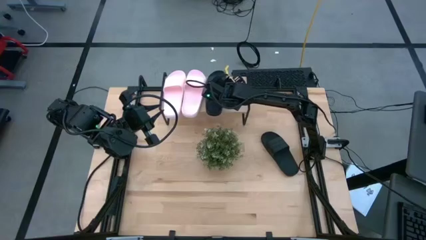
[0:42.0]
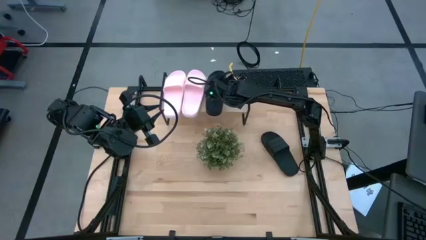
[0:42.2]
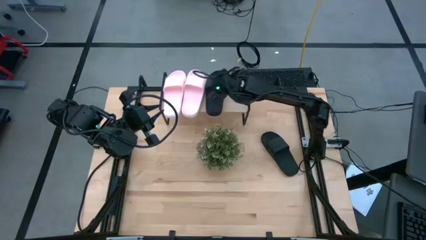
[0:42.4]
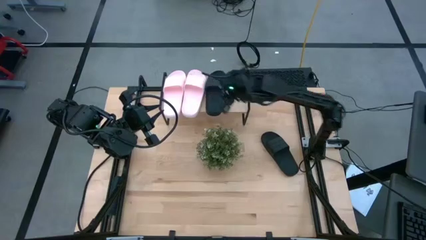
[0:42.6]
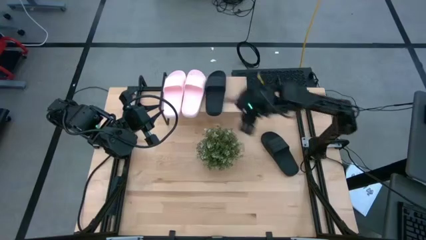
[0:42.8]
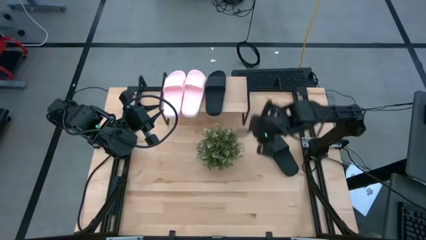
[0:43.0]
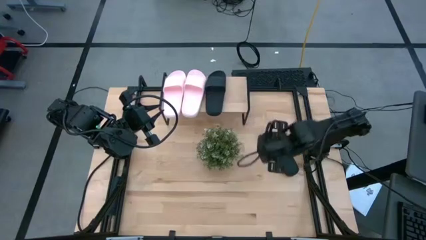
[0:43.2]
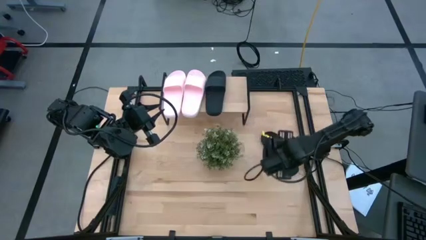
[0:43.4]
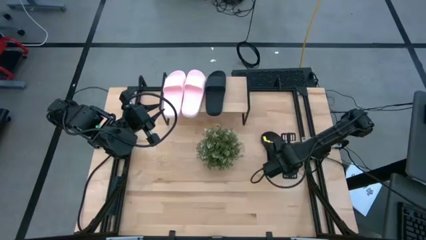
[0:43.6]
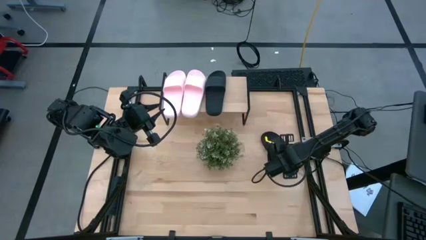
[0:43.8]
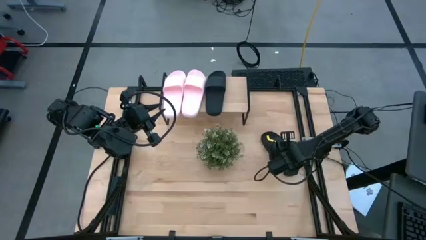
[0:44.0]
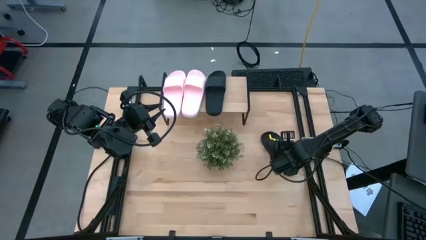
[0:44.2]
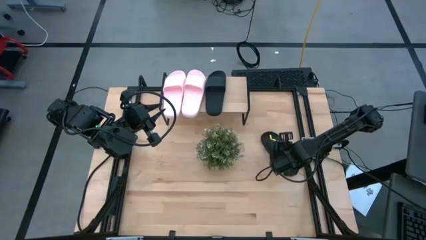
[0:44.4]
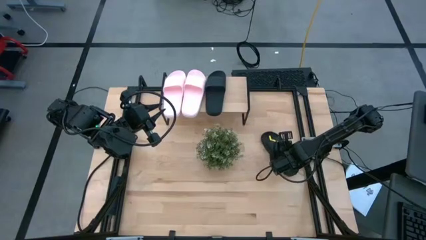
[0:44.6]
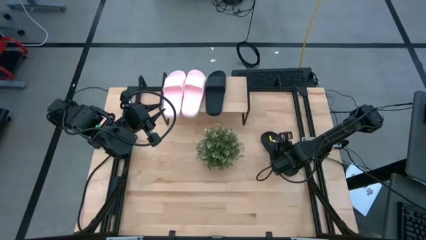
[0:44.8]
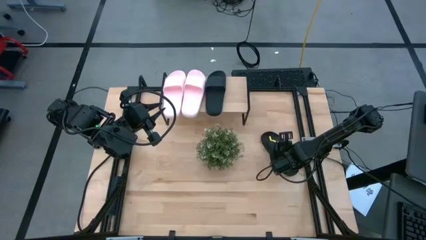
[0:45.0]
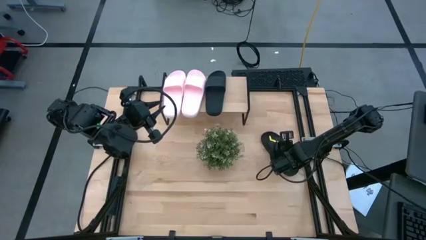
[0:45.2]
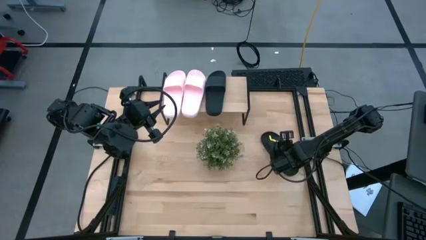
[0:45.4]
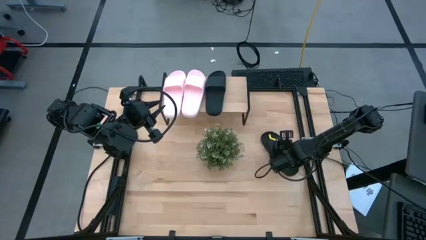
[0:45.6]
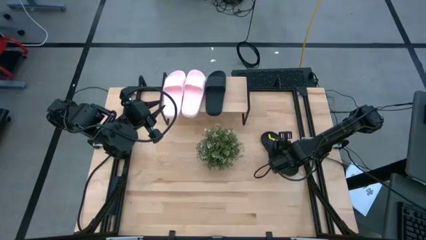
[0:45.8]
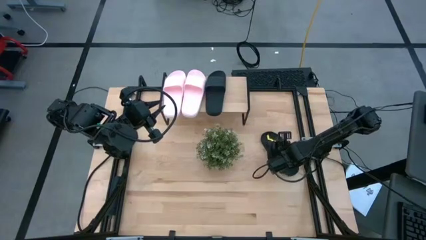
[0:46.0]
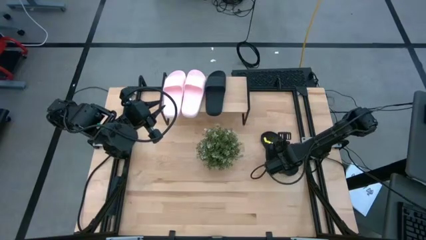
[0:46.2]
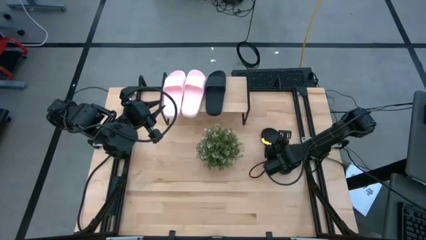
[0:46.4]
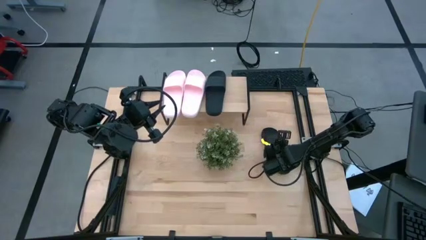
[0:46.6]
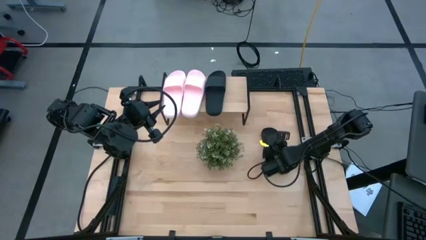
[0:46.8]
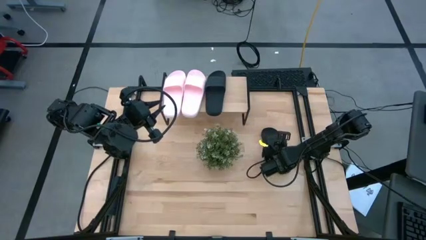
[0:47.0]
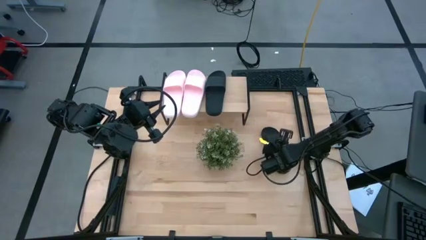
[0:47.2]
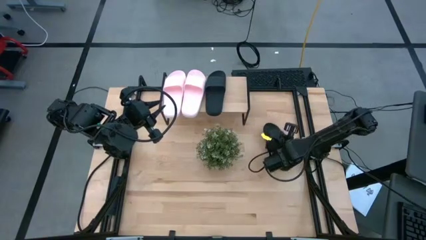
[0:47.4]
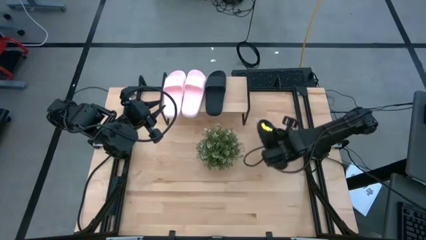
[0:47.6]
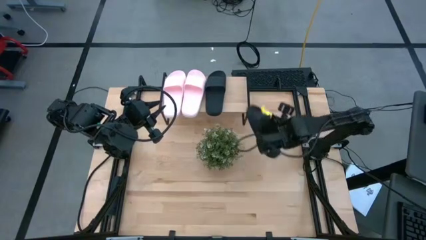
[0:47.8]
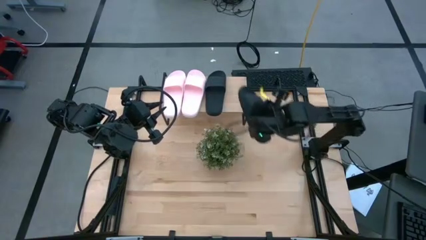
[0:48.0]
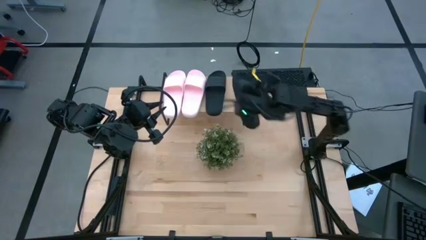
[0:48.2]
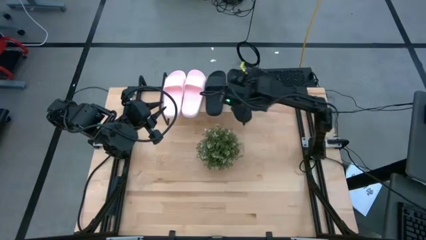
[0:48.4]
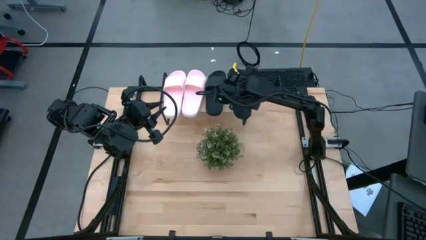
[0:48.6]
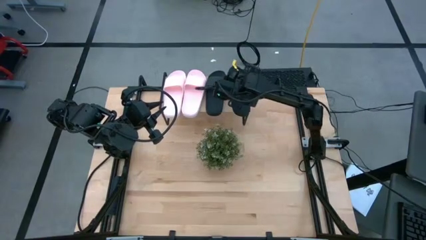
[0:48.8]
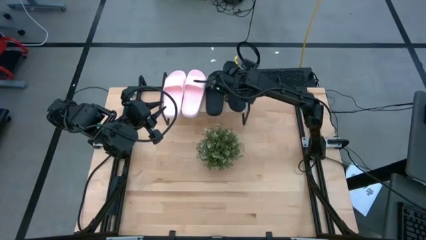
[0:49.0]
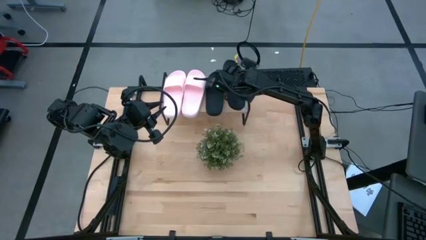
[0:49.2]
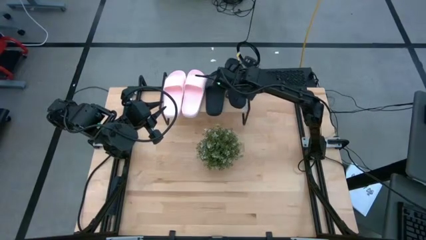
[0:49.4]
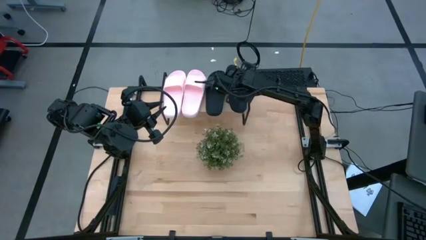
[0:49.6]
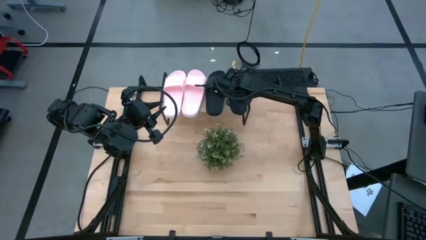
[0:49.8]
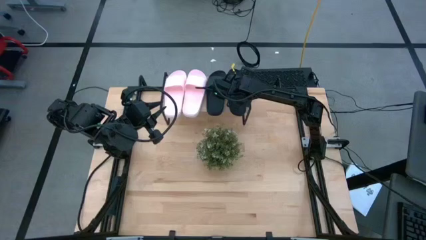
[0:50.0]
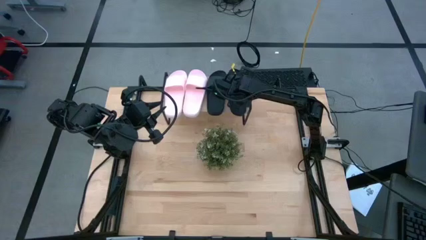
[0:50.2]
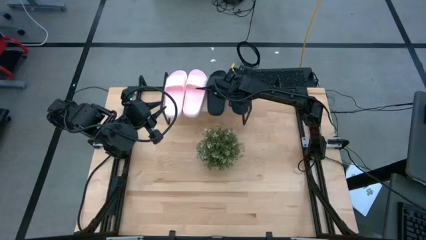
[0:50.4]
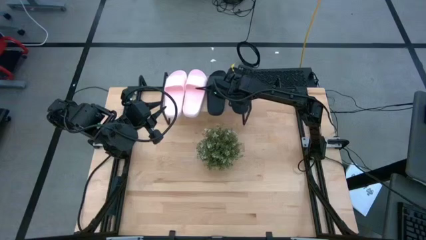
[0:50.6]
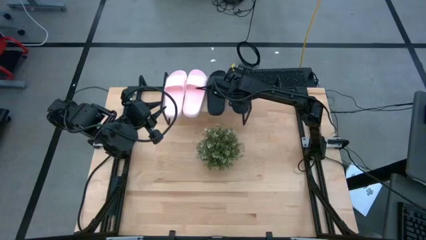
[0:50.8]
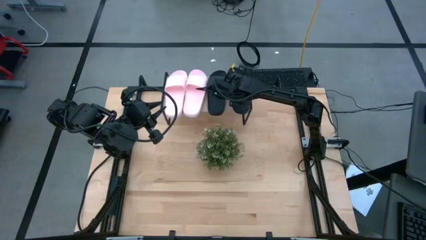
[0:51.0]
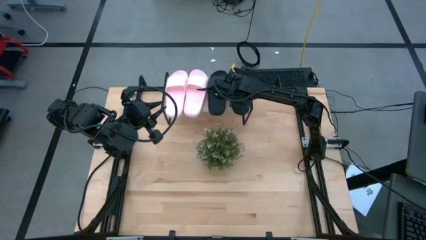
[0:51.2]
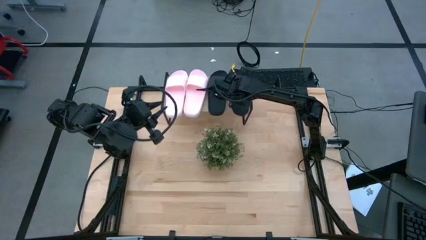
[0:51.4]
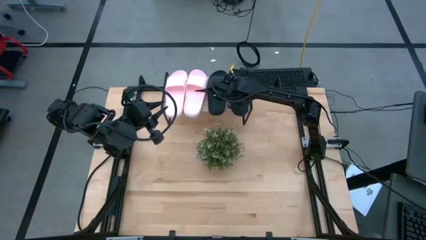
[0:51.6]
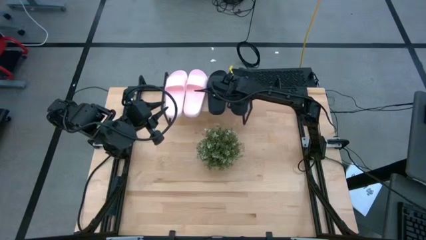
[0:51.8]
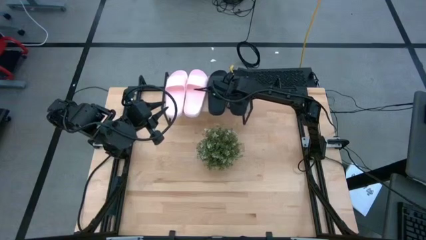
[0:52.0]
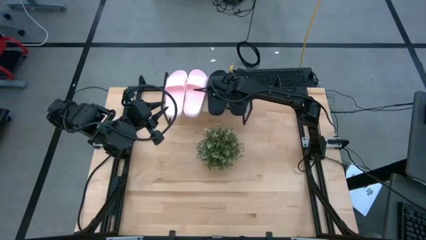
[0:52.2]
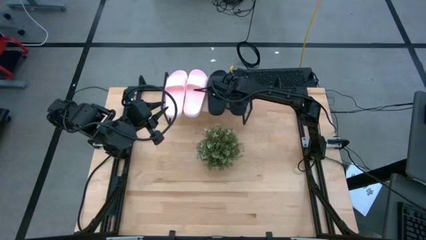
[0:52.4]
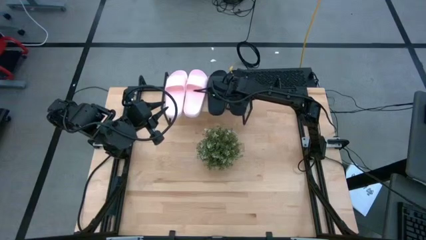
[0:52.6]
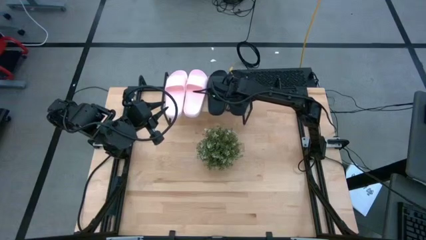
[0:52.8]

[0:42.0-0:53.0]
Task: Pick and place slides into the shelf
Put the black slides on the shelf

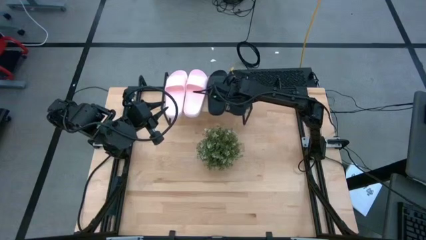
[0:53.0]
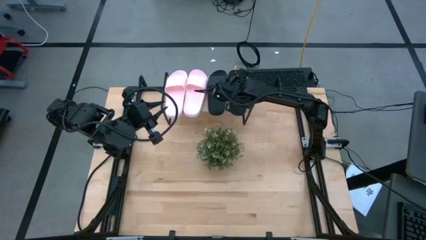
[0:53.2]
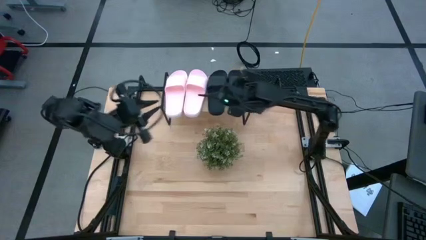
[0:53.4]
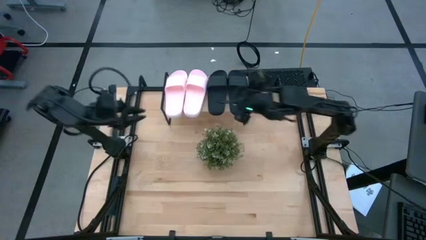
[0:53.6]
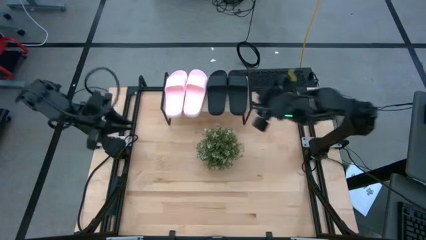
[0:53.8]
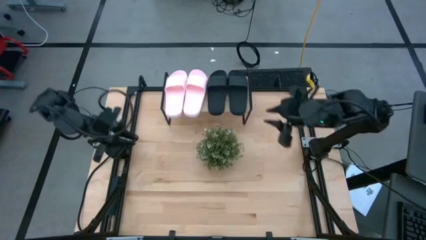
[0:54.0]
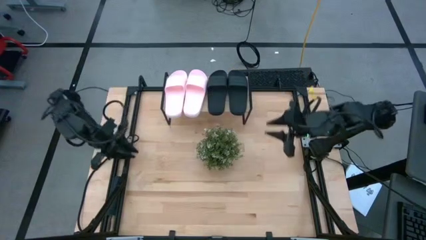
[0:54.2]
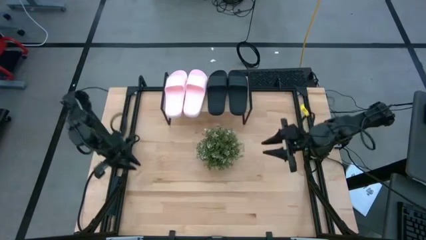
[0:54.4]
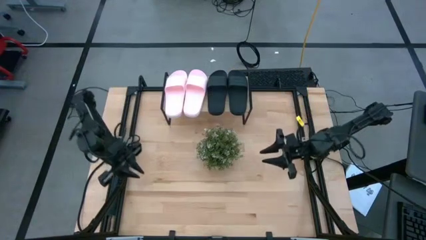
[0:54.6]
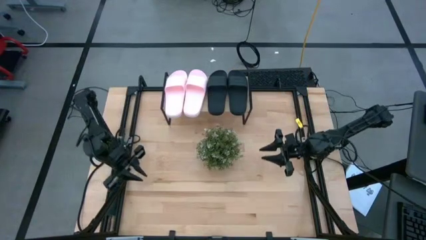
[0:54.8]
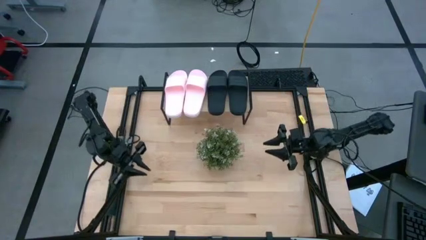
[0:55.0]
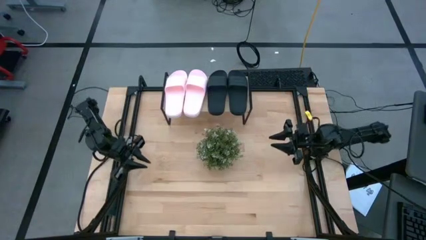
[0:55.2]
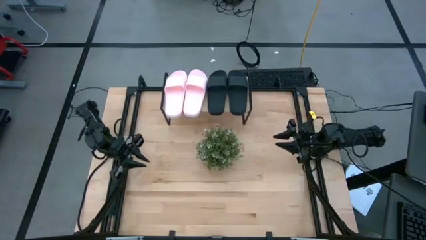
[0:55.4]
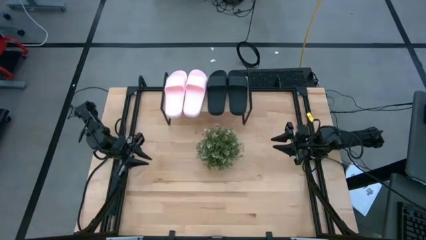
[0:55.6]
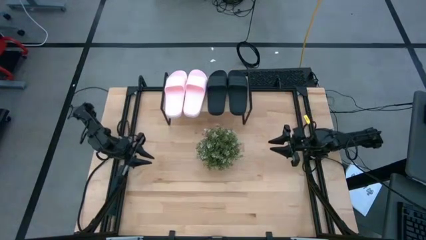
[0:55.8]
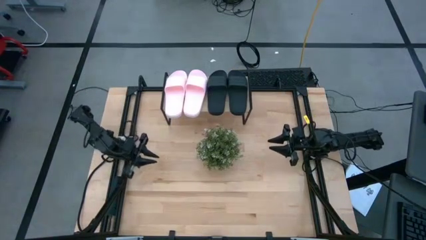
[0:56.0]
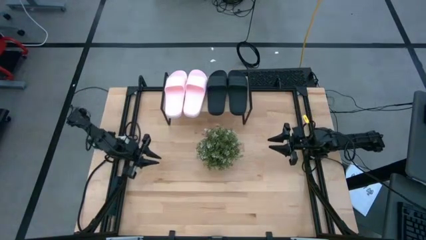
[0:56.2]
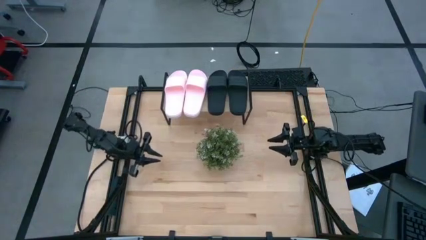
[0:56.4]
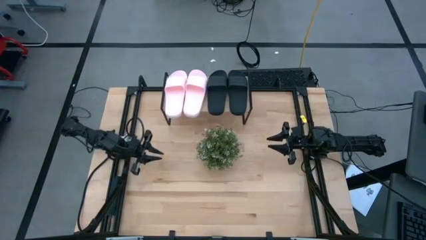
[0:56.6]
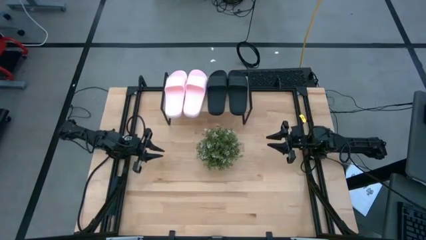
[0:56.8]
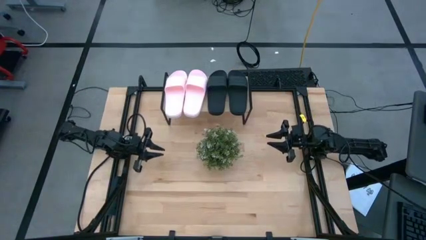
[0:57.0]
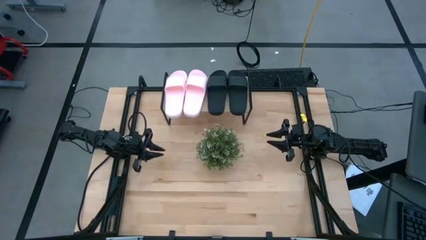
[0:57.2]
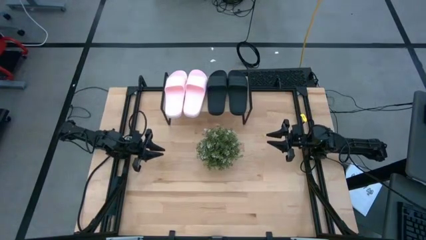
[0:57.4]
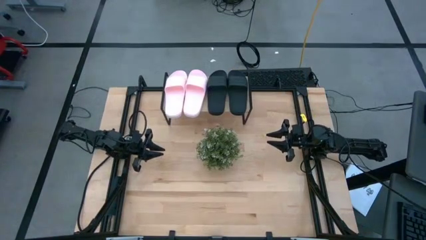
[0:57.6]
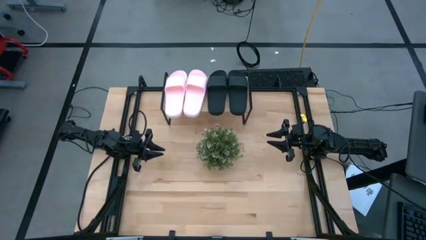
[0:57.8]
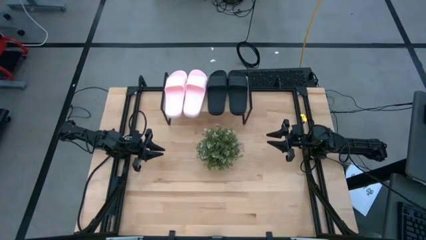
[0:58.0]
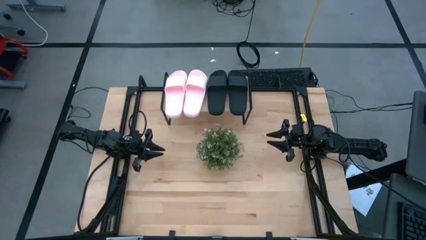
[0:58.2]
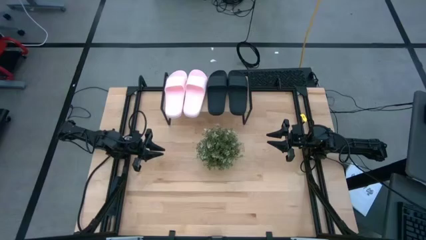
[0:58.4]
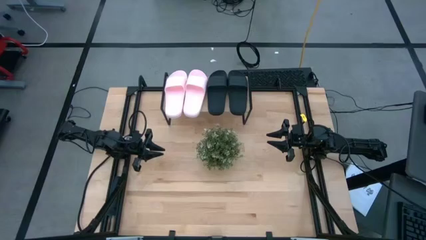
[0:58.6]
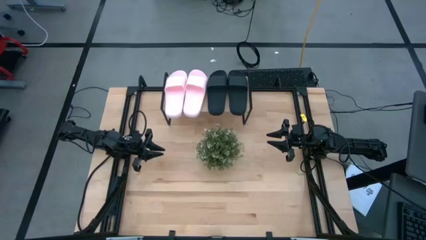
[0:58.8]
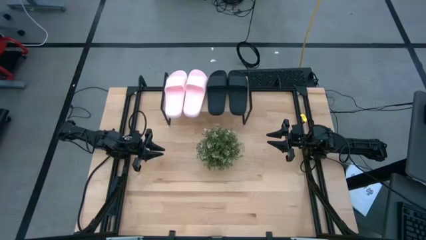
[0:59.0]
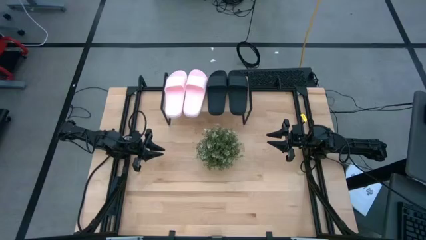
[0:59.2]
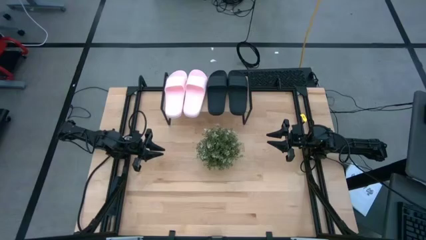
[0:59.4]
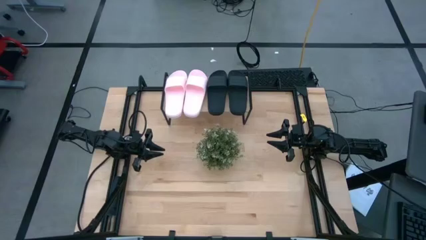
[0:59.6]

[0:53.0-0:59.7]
Return to Home Position
